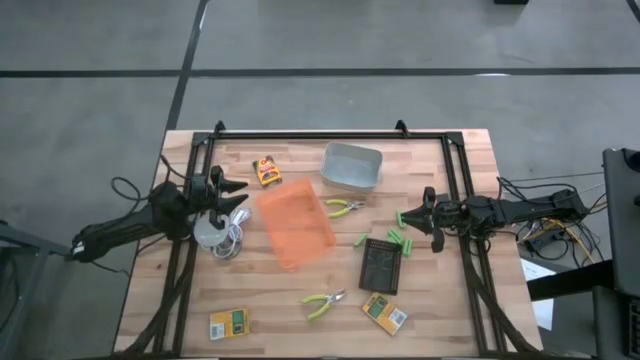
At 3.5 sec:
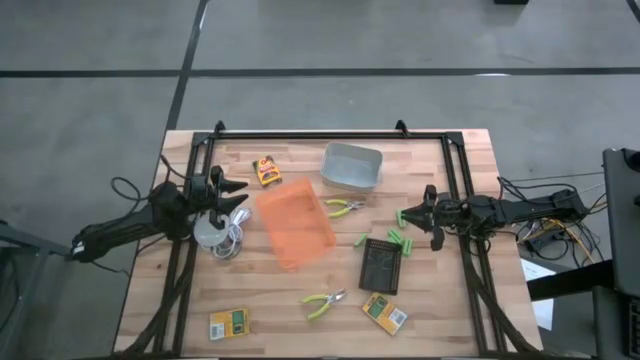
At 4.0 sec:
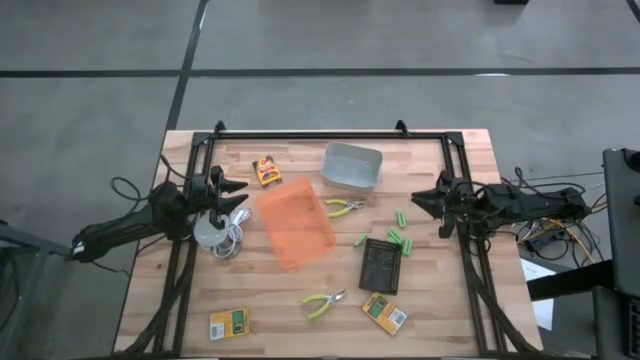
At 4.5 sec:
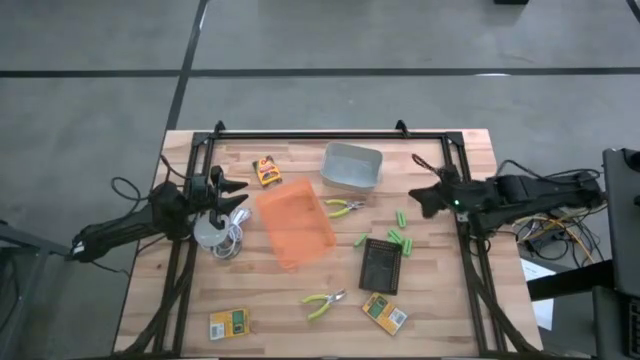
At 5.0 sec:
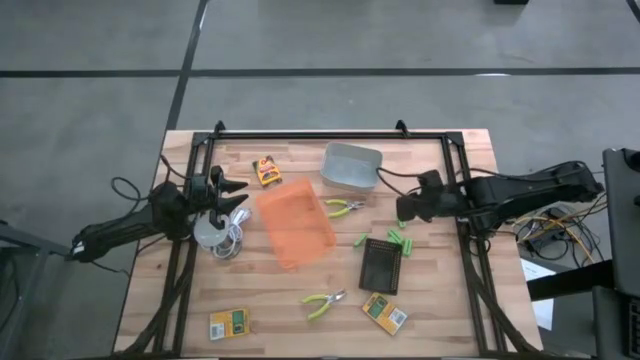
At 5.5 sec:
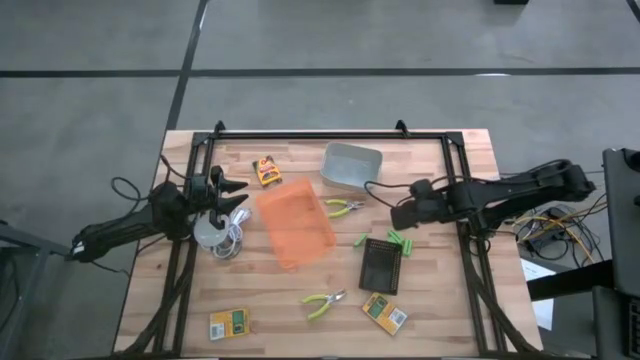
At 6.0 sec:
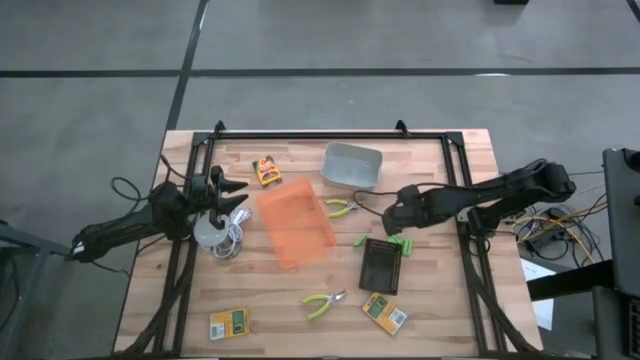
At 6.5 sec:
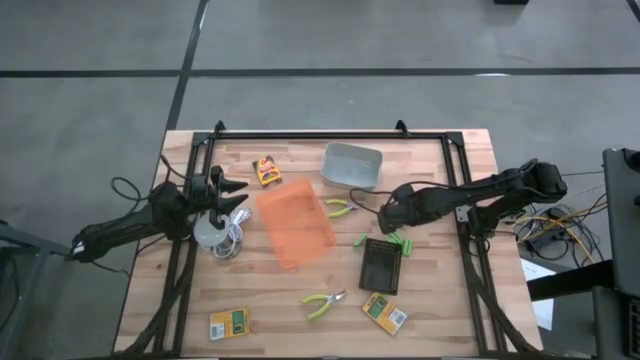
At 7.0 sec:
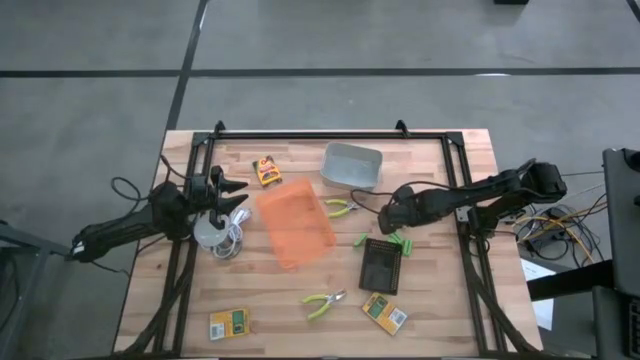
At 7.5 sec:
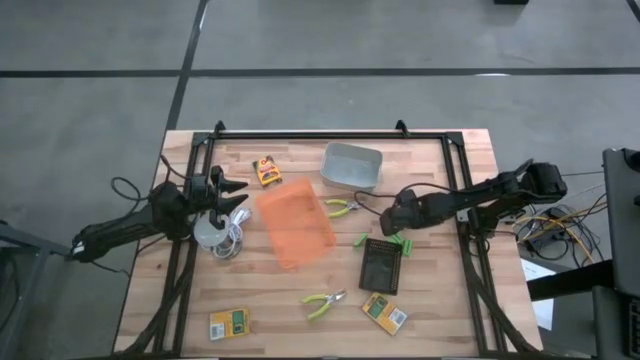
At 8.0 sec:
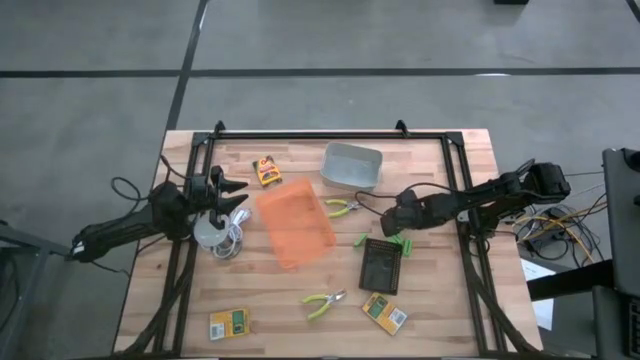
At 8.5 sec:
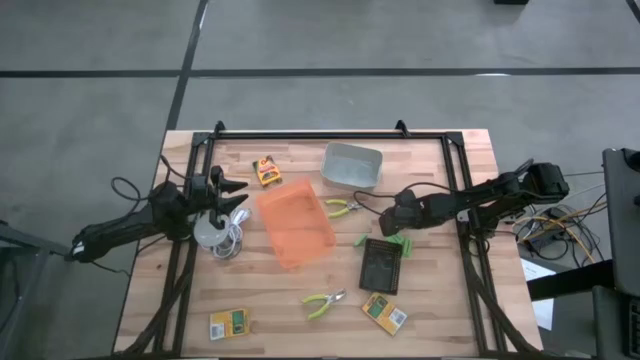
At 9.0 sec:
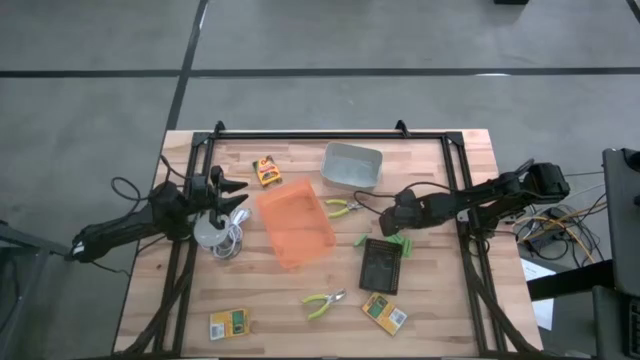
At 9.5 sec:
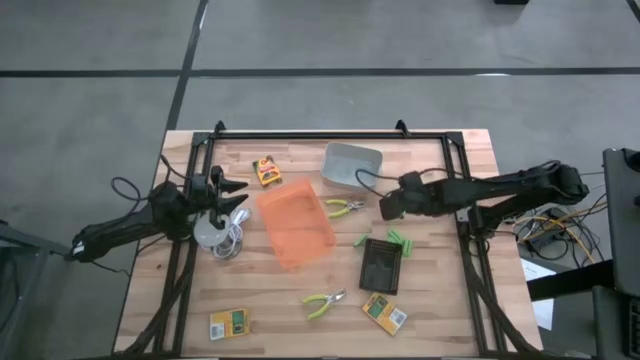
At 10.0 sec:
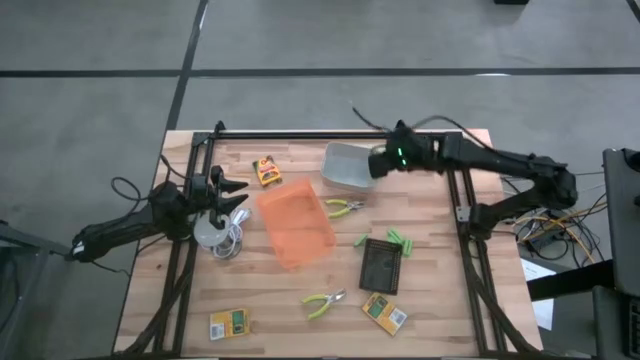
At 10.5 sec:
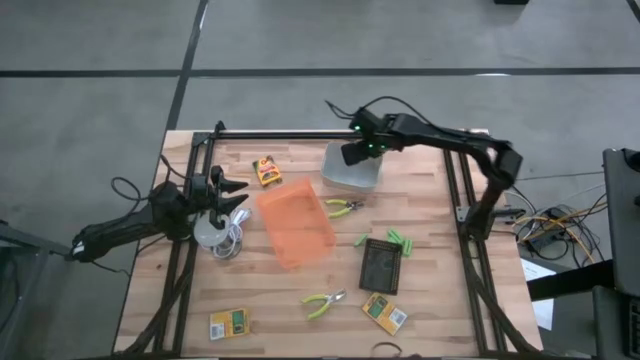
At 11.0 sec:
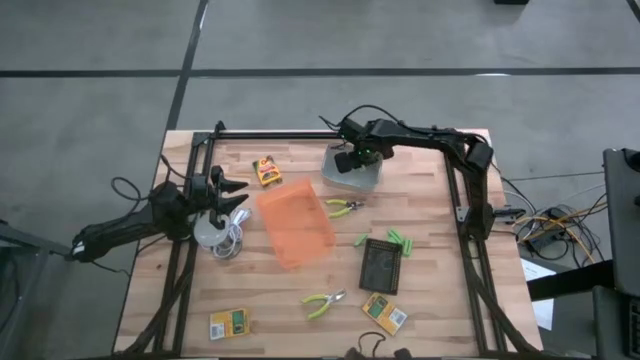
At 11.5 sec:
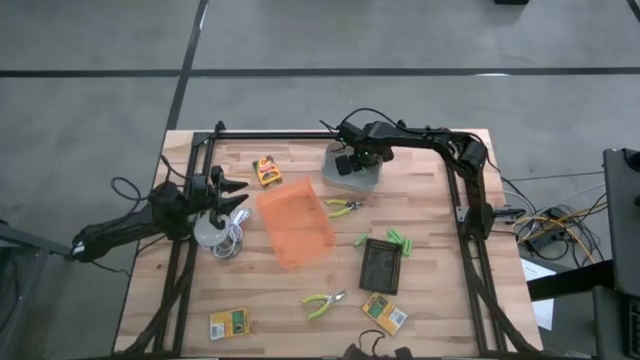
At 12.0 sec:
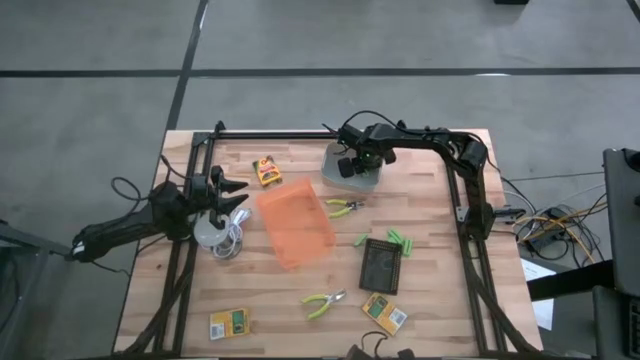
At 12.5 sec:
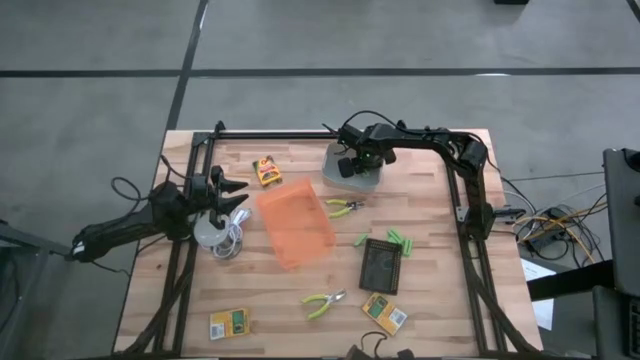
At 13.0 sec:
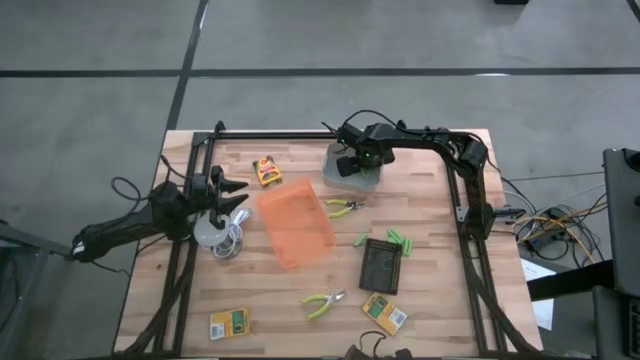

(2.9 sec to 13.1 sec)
Task: Pick & Place School Supplies
Put the green eraser into the gray bin

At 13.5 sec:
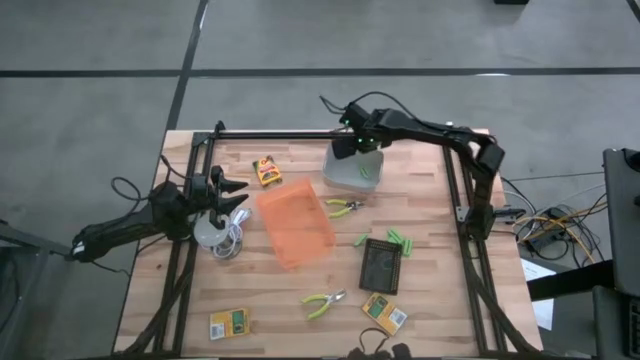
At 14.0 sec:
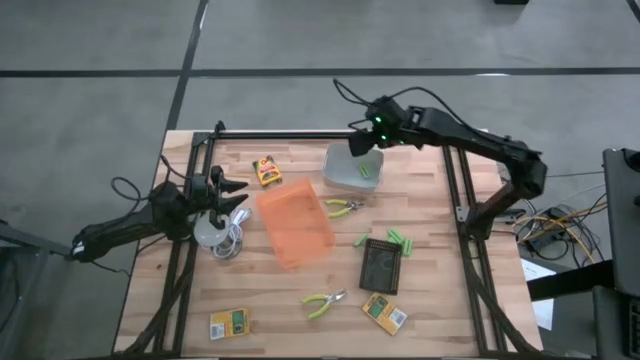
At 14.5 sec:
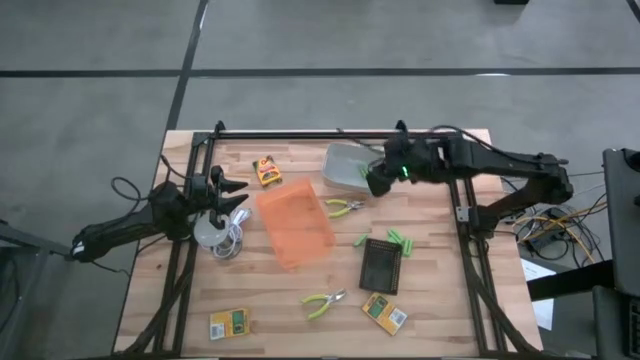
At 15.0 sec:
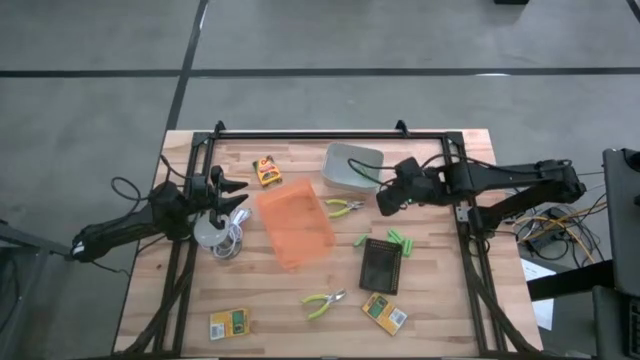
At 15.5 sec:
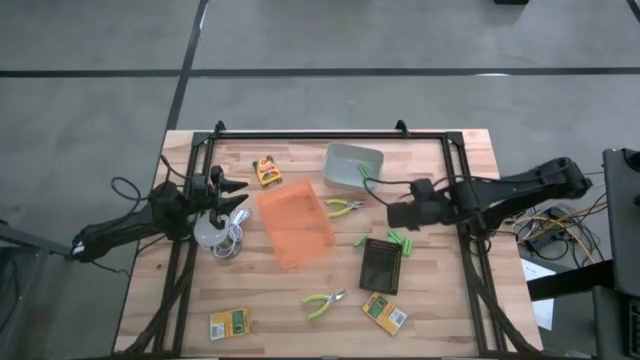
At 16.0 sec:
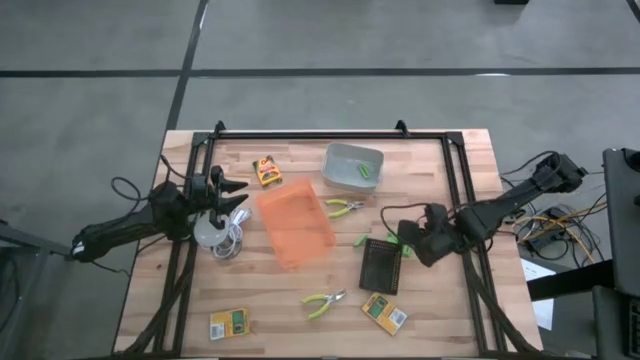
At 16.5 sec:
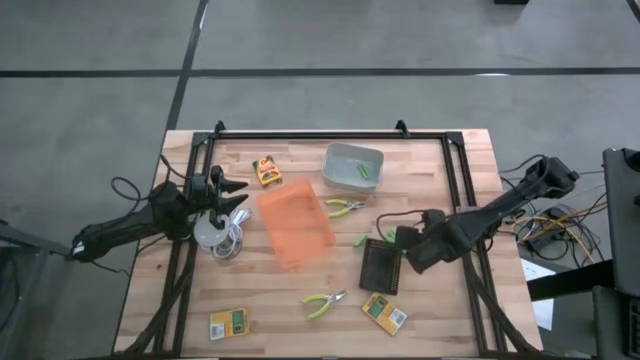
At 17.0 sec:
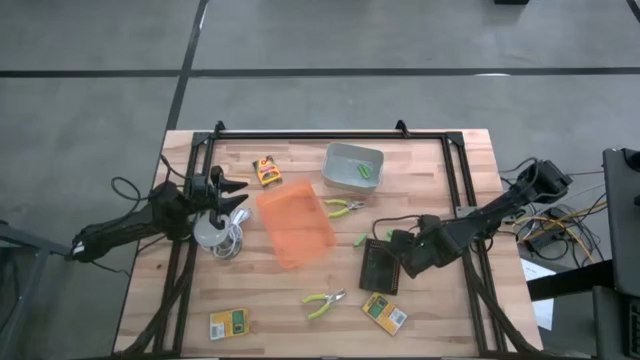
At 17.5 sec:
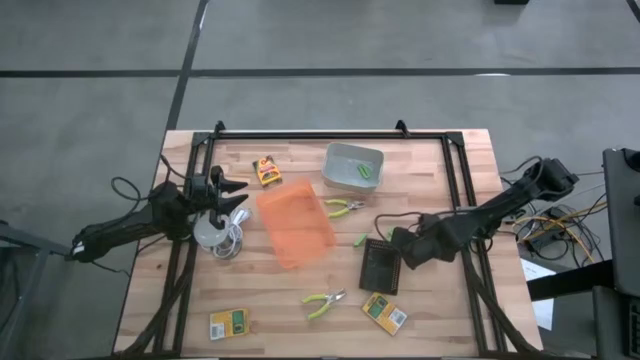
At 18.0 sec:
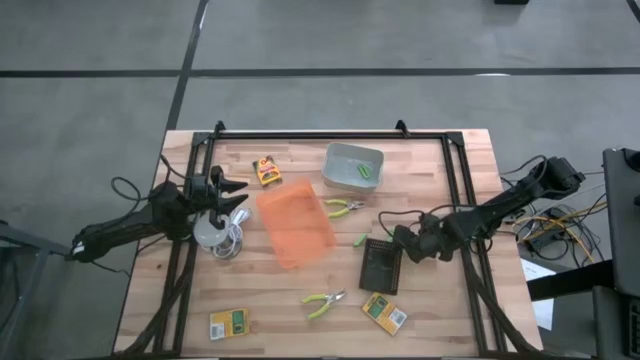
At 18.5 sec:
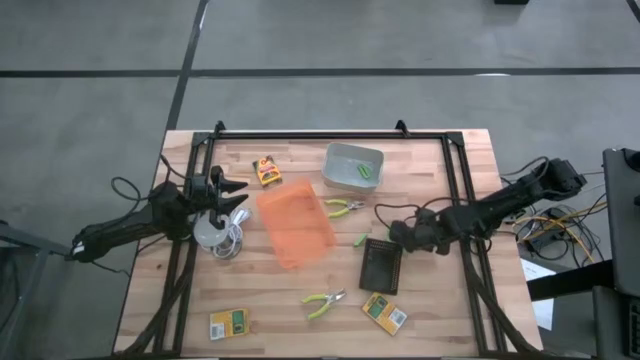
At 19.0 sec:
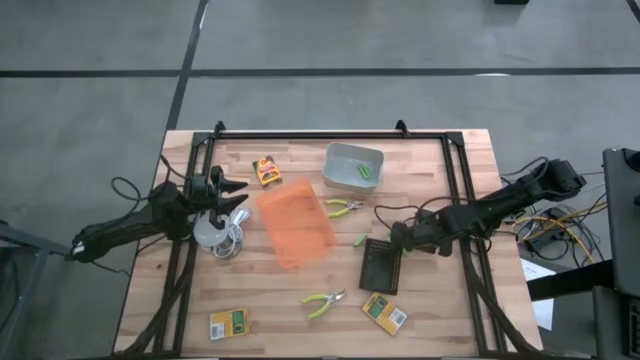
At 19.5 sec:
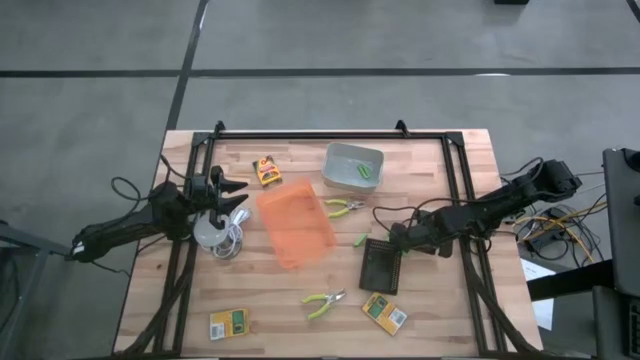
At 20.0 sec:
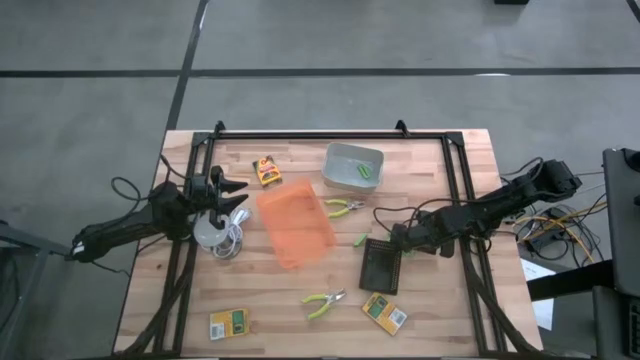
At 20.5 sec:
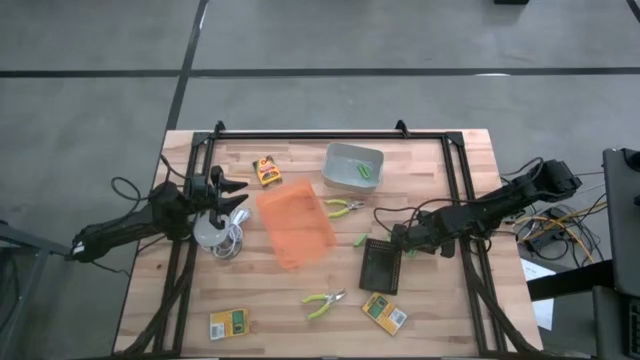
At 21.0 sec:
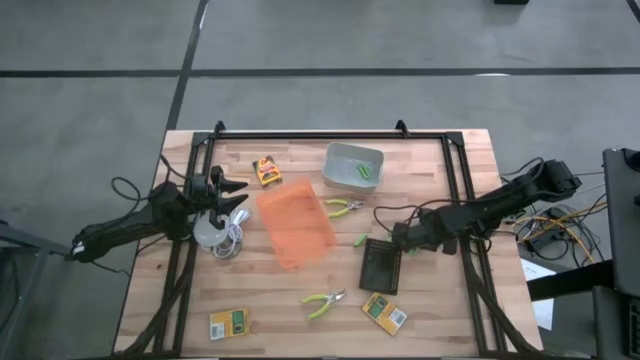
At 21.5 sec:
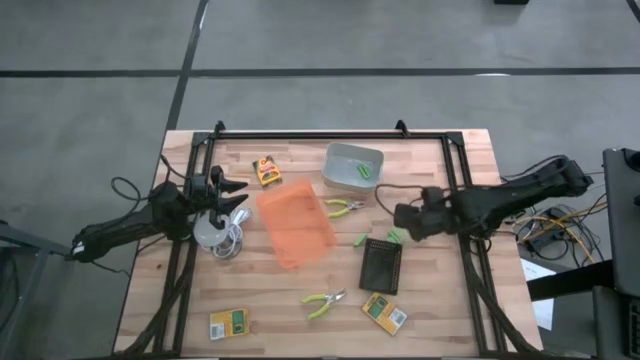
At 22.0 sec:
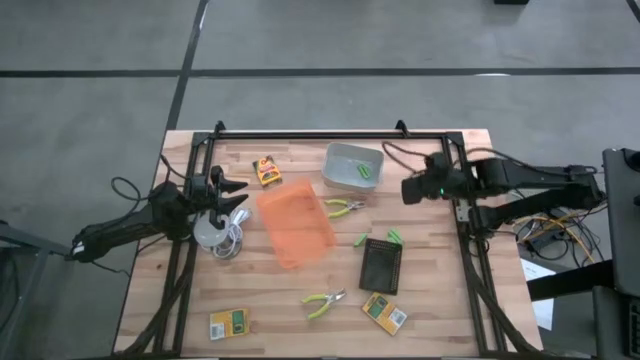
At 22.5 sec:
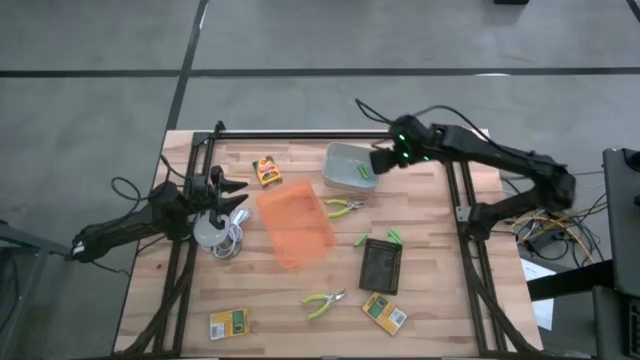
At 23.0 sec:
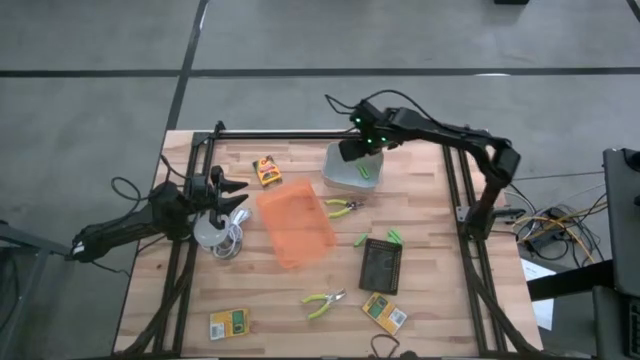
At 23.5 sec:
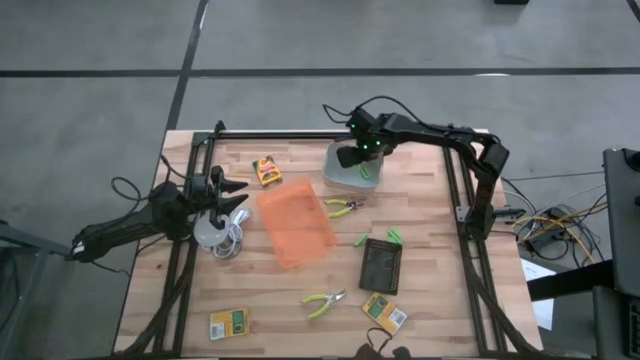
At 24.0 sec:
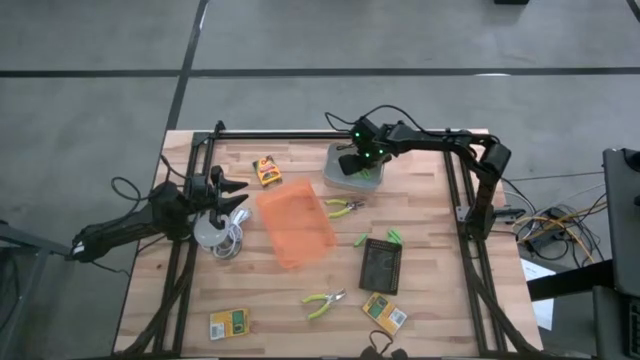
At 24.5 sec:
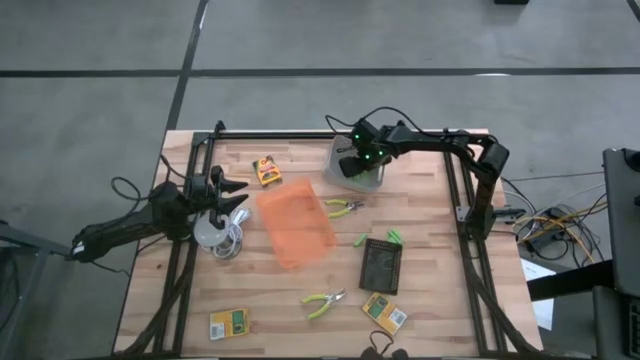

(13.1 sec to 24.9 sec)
Put the green eraser into the gray bin
